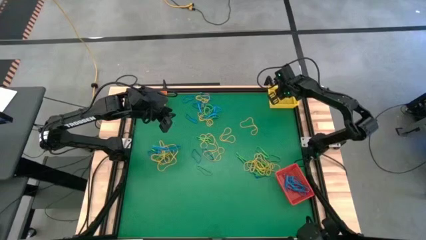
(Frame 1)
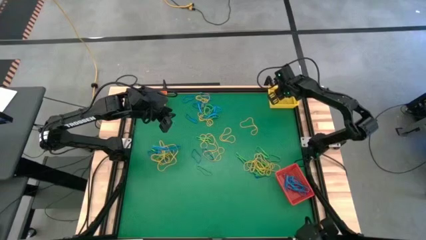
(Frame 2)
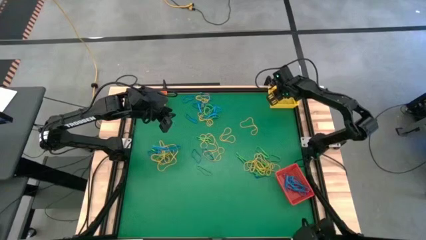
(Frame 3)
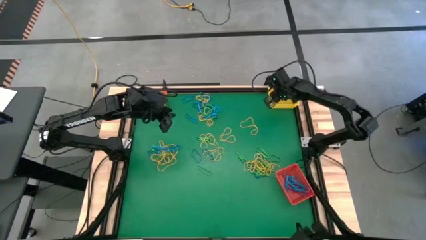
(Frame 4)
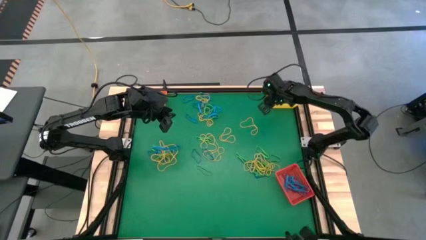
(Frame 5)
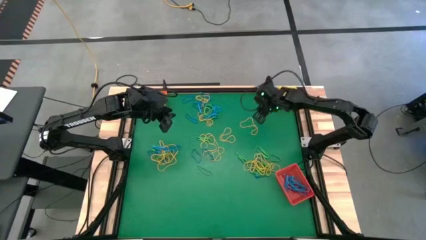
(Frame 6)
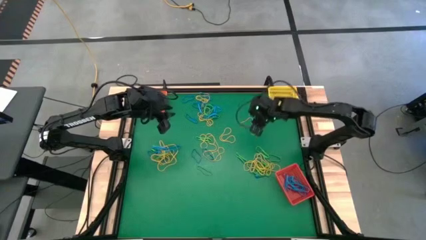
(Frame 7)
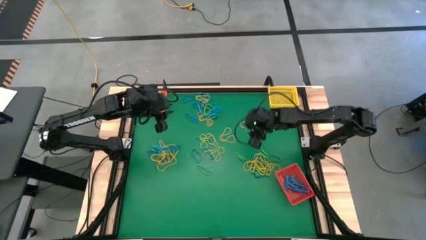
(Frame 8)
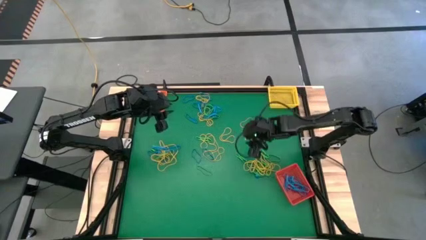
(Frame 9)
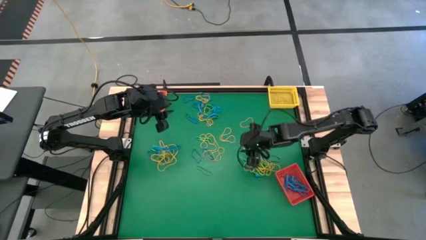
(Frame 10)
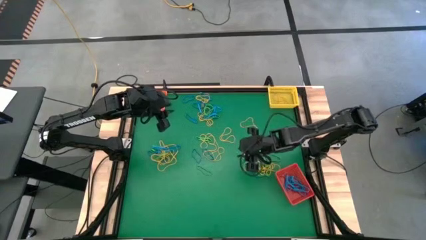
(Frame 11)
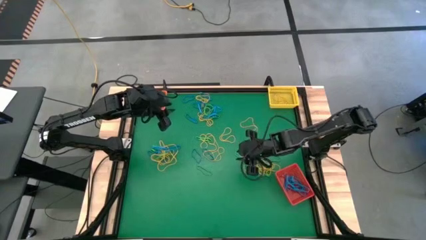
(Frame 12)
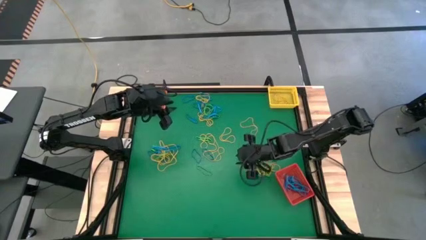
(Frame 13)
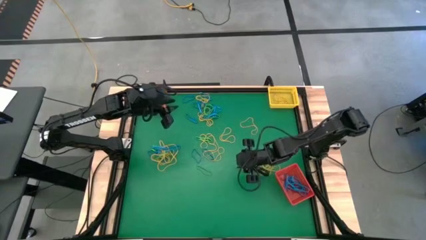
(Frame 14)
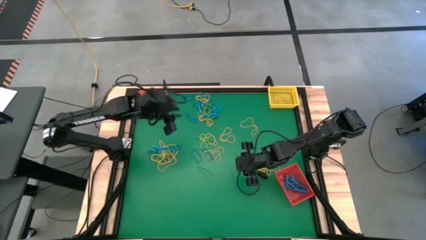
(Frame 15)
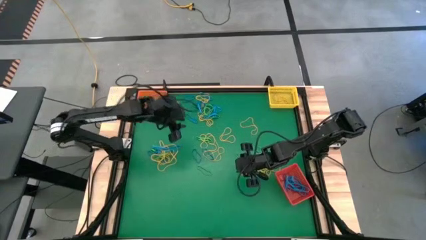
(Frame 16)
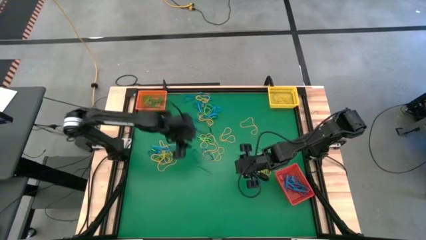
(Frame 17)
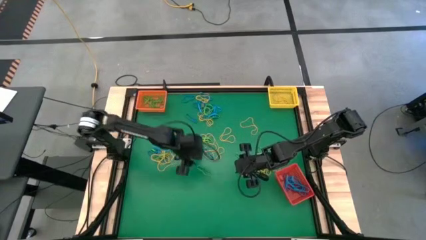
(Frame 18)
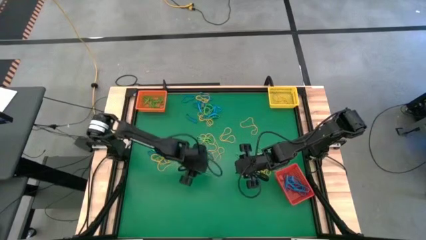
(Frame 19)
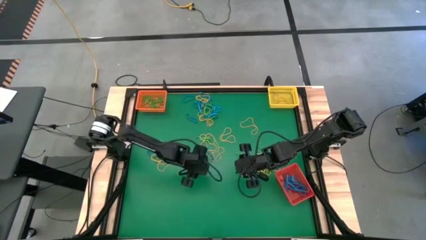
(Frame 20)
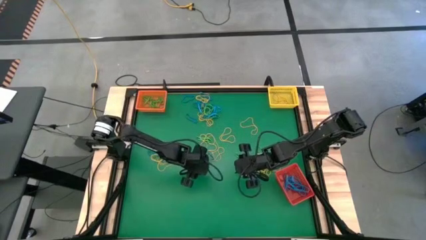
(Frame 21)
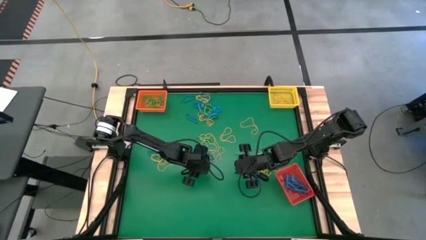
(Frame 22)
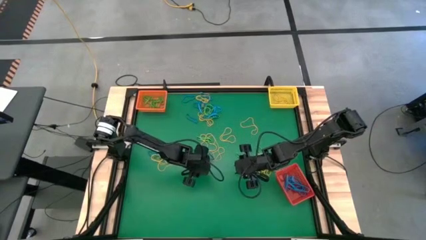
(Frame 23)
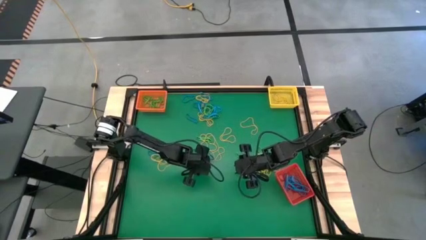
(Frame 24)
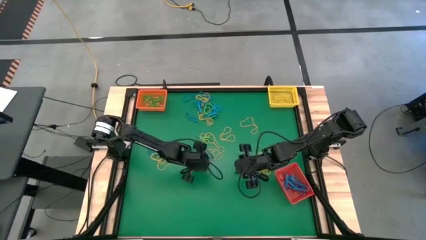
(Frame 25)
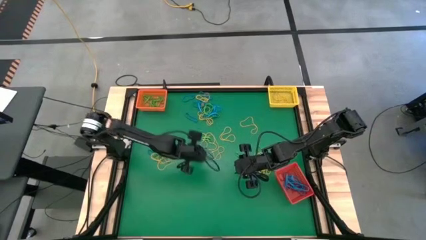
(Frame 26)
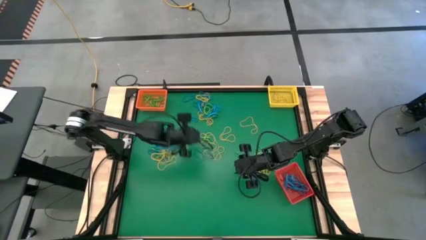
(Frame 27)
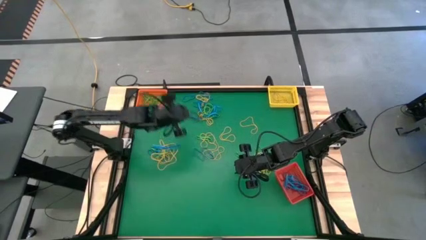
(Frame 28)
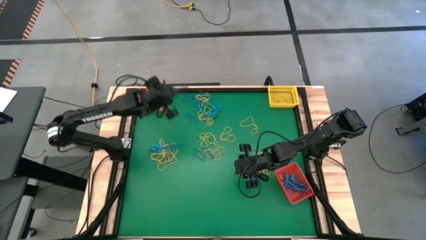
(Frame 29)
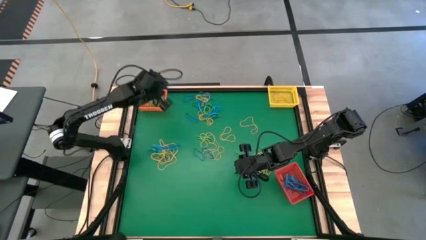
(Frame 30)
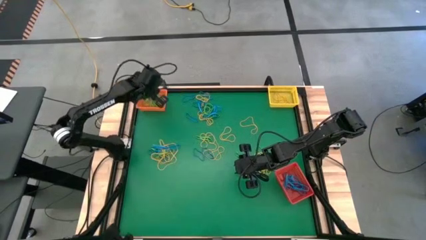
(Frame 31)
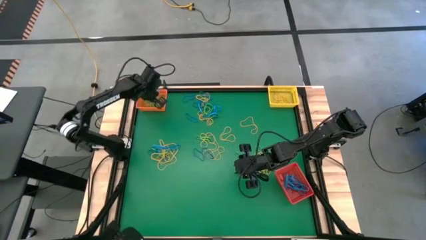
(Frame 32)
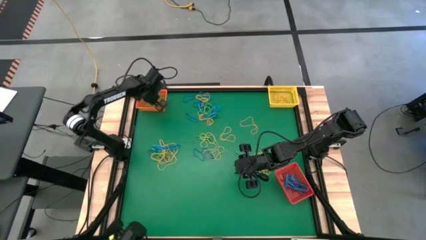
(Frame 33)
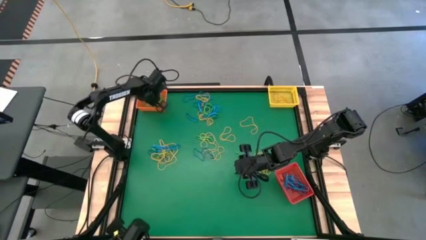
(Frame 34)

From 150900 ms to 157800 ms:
Task: Sort rubber bands into baskets
Put the green rubber band into the orange bin

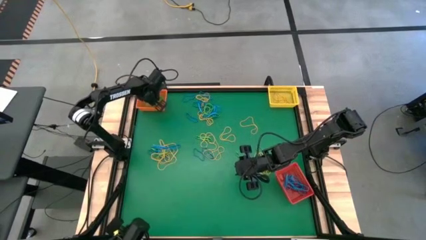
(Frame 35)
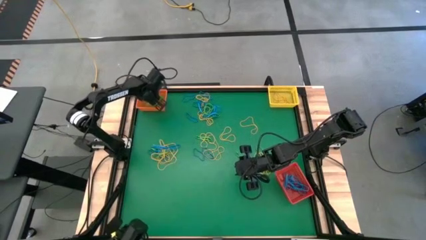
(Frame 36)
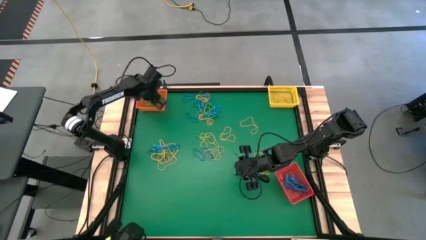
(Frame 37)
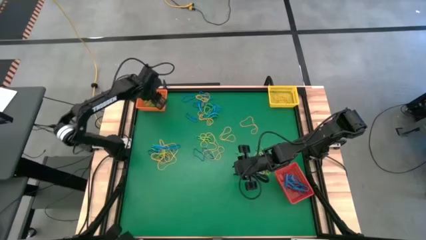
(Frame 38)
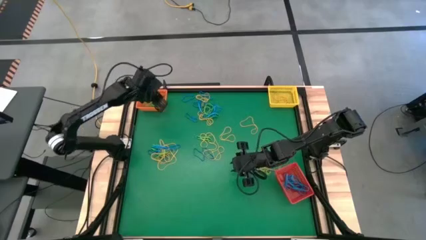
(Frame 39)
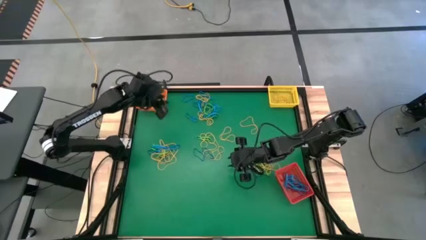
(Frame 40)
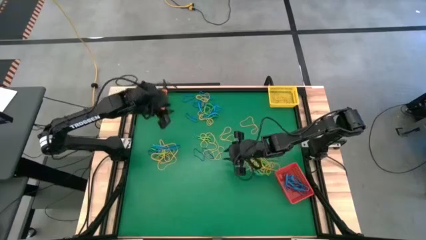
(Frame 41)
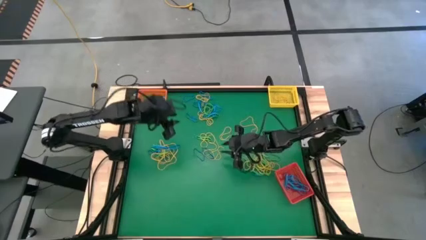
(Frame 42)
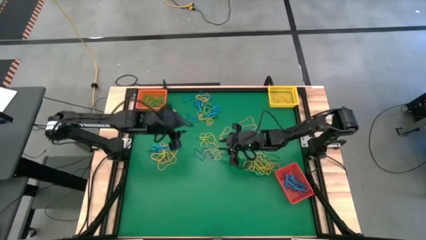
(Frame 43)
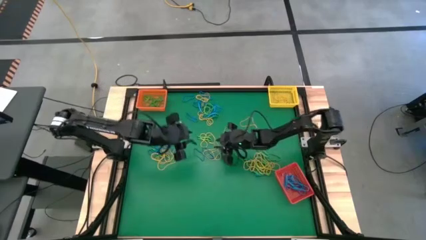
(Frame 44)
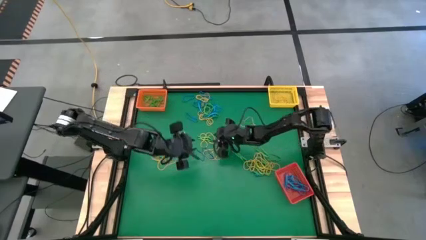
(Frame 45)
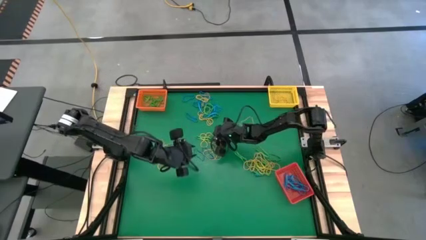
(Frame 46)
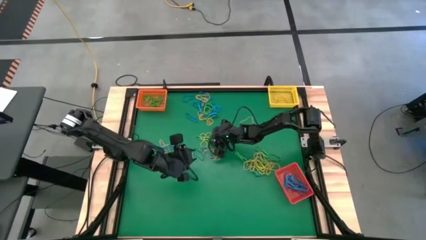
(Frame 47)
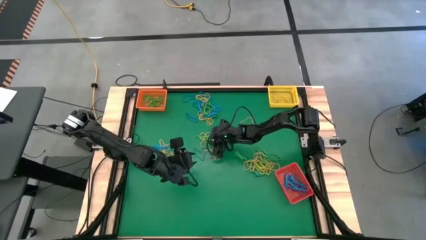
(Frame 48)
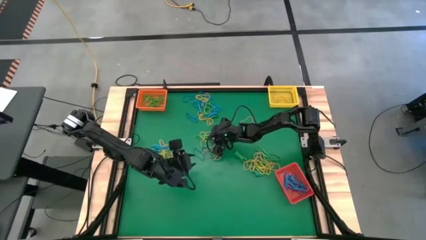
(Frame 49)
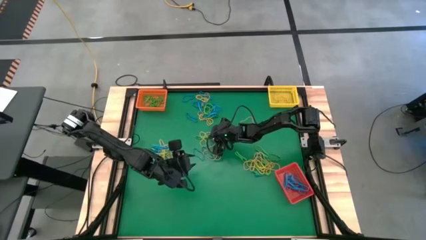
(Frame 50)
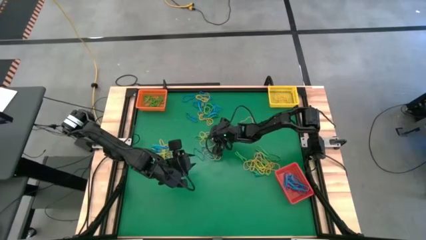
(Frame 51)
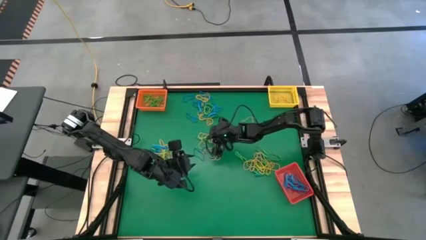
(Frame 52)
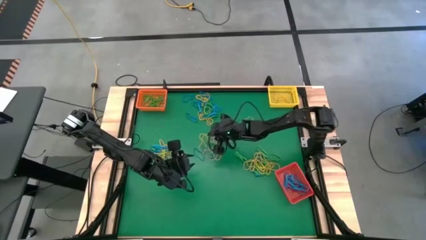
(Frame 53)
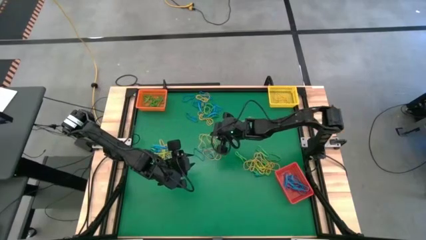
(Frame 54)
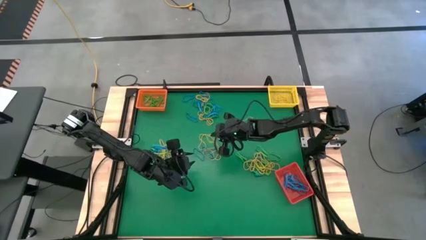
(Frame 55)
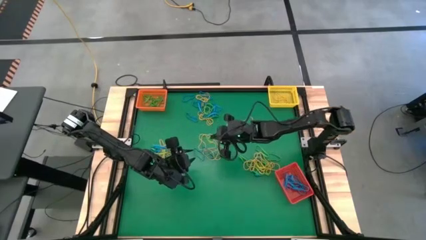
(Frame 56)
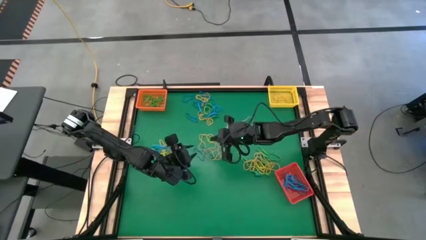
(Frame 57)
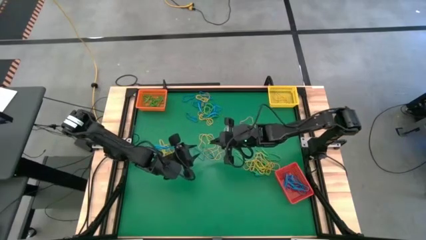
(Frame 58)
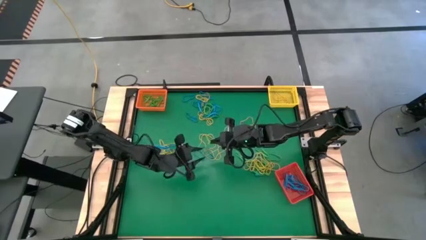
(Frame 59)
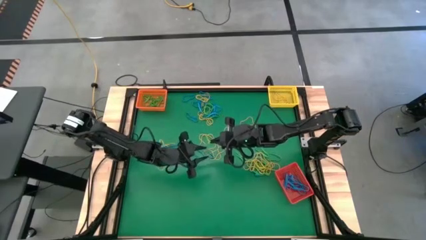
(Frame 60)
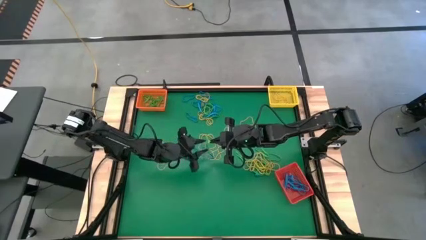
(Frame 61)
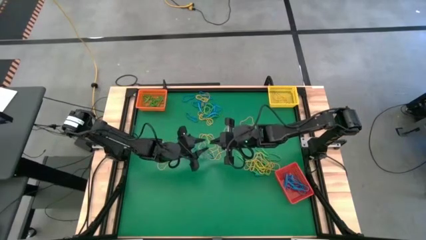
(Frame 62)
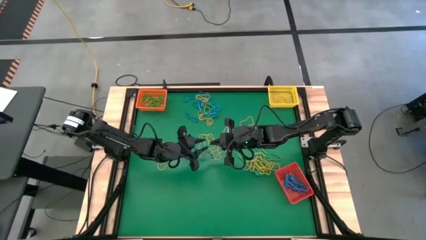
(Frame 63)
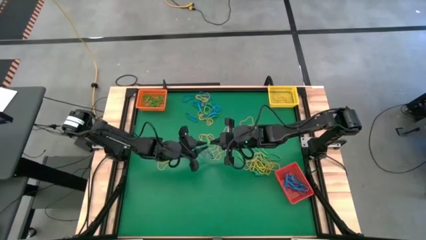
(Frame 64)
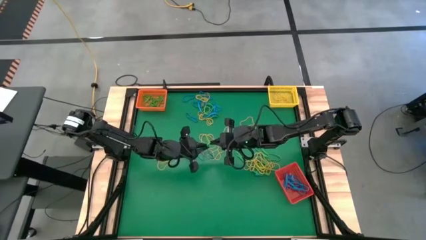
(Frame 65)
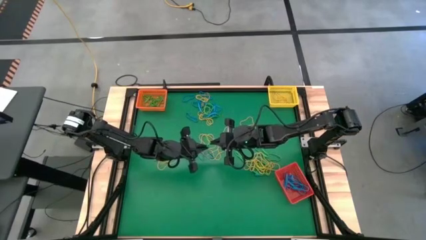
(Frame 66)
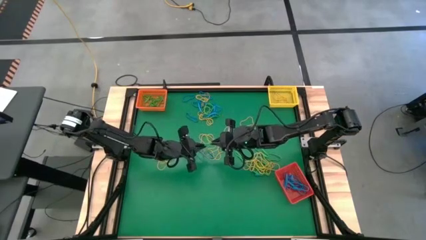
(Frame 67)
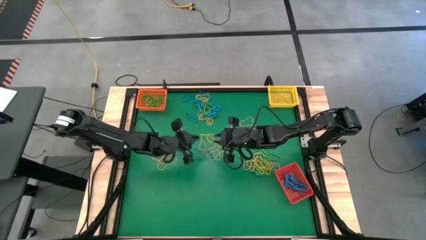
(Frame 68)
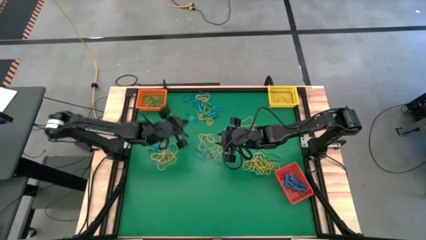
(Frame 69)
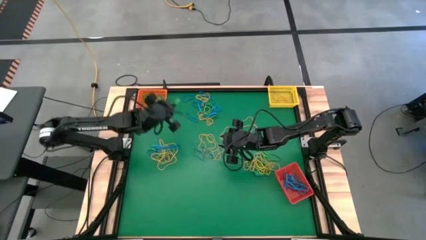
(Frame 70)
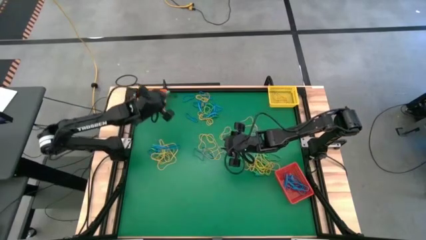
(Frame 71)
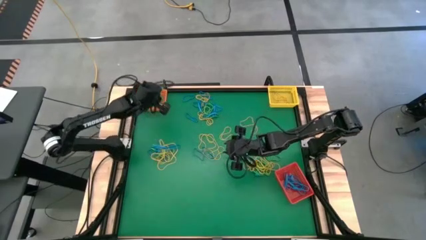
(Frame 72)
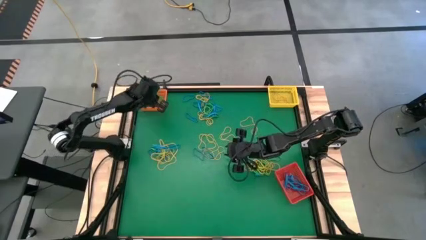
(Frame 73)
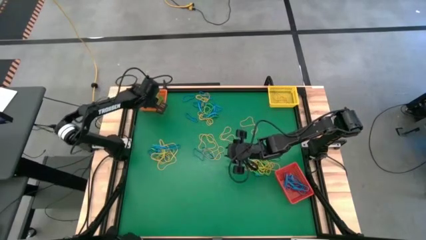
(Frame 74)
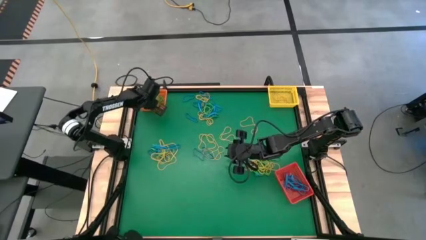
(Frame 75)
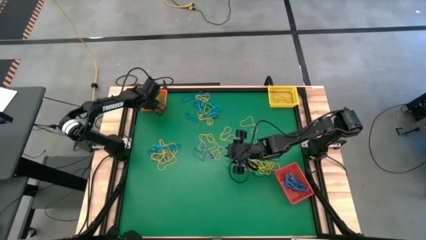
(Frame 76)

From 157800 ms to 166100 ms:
Put the green rubber band into the orange bin

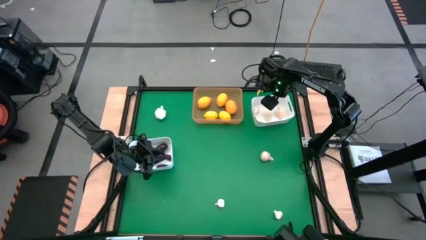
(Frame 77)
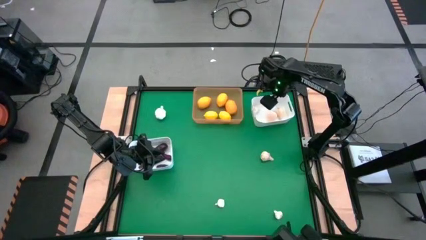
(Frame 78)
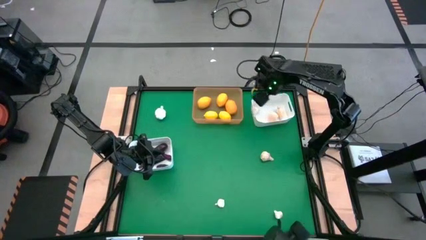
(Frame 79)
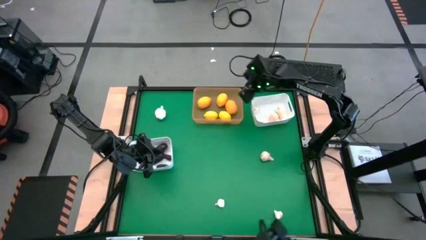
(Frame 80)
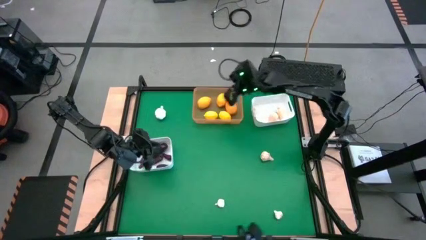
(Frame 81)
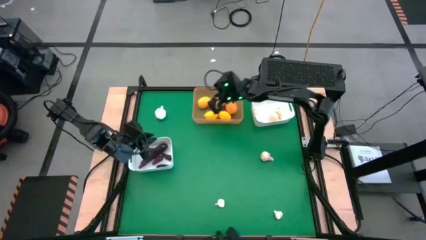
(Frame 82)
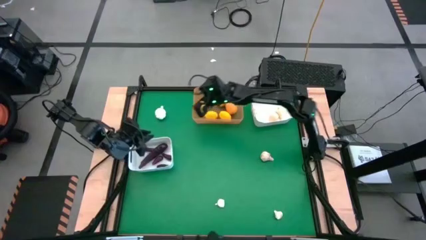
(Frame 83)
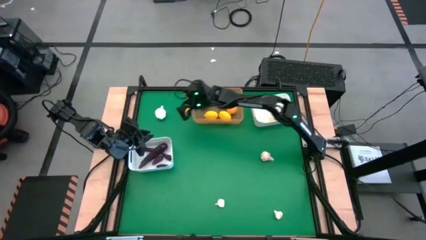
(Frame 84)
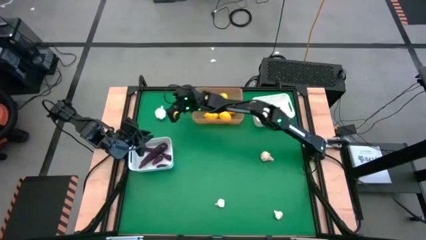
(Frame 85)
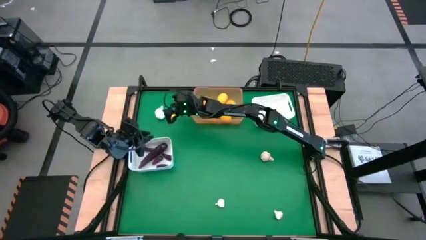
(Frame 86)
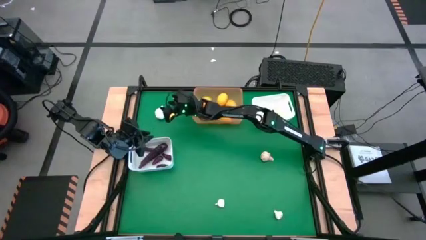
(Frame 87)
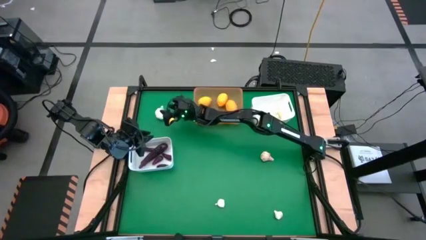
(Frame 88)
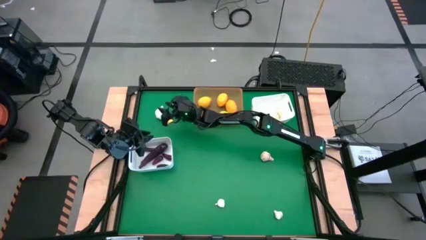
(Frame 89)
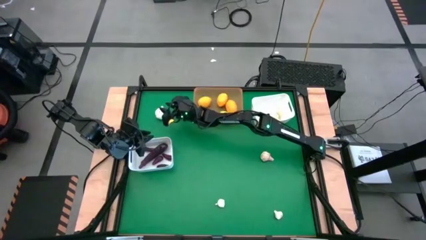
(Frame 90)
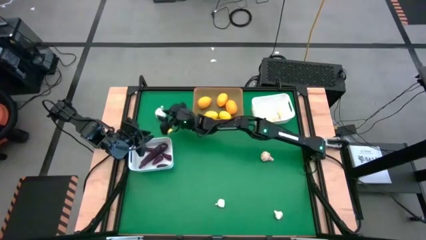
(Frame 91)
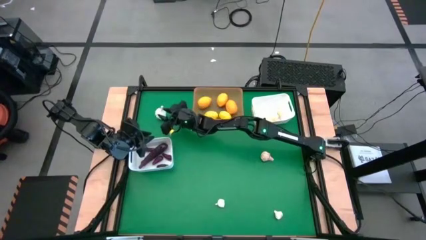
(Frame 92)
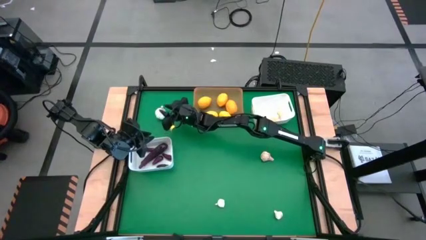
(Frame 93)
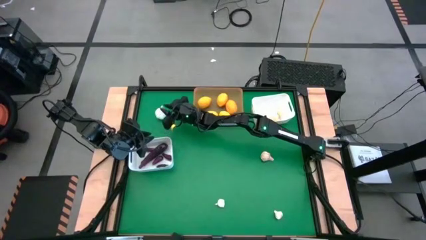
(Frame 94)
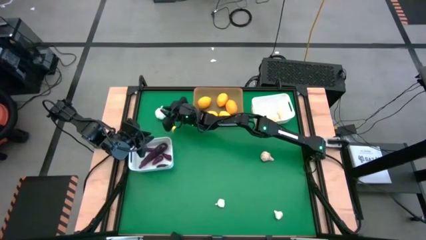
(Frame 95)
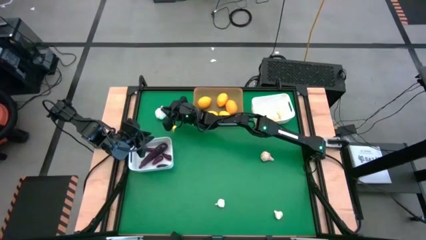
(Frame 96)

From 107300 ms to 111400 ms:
Task: Sort produce into baskets
Put the garlic into the right white bin
